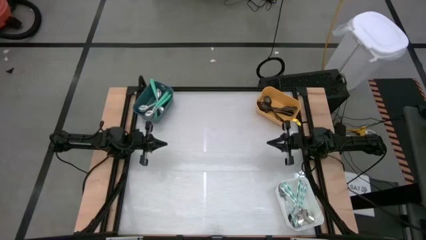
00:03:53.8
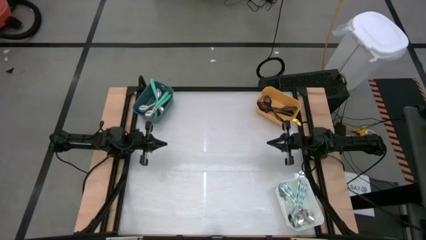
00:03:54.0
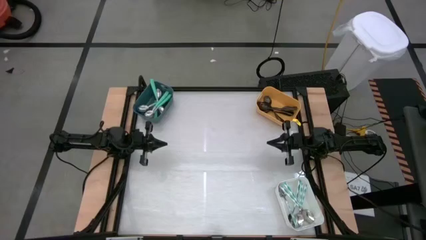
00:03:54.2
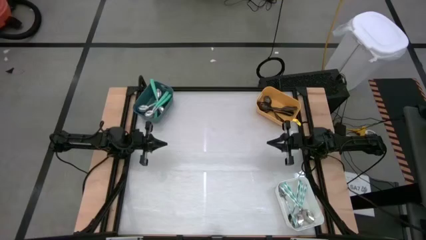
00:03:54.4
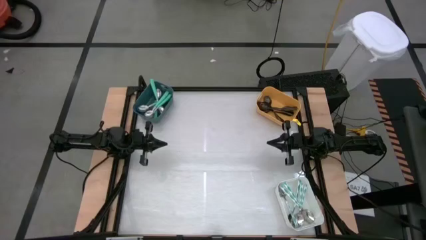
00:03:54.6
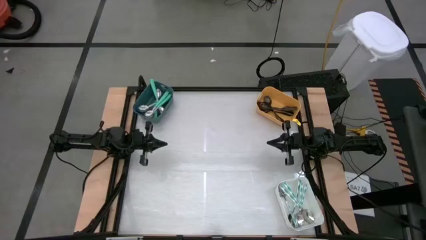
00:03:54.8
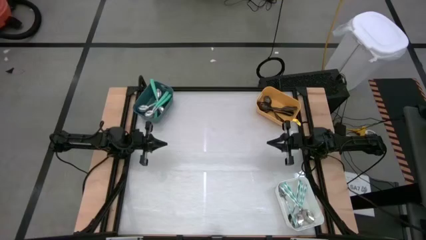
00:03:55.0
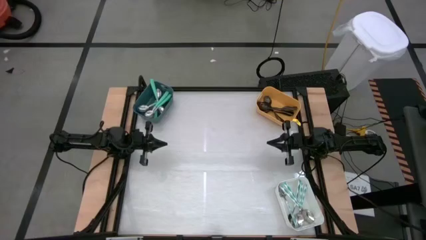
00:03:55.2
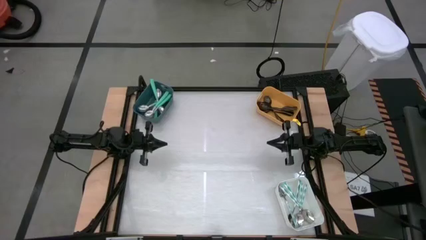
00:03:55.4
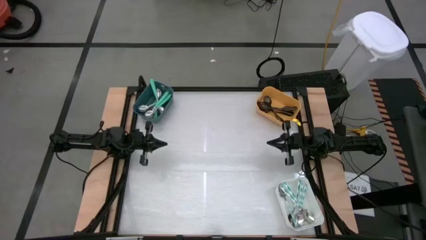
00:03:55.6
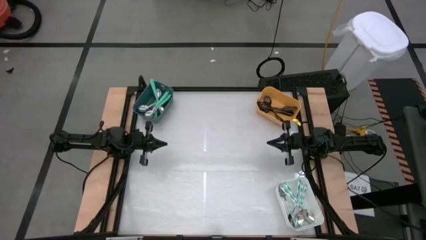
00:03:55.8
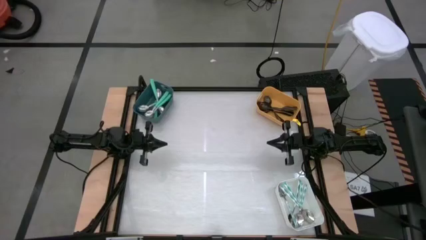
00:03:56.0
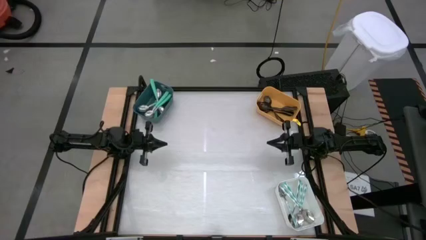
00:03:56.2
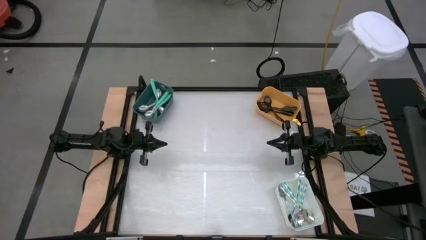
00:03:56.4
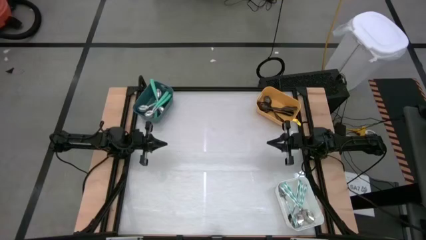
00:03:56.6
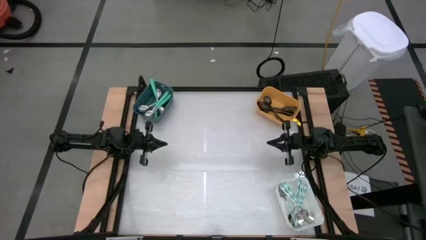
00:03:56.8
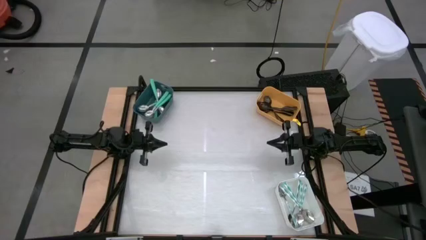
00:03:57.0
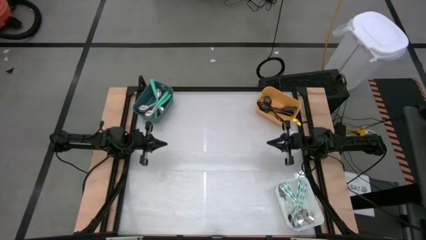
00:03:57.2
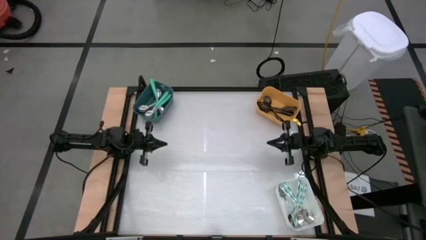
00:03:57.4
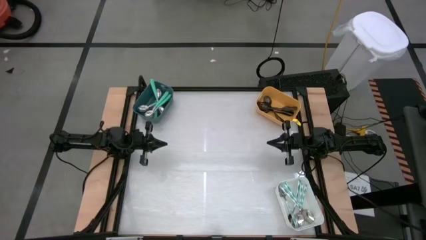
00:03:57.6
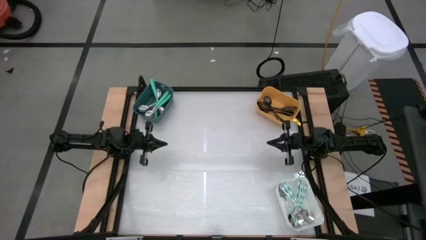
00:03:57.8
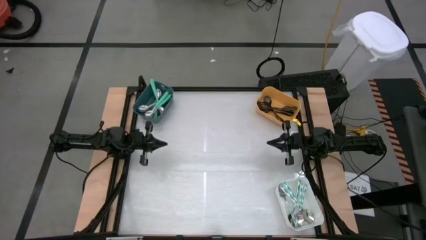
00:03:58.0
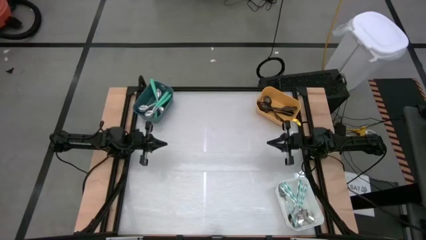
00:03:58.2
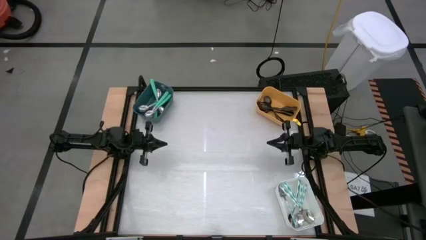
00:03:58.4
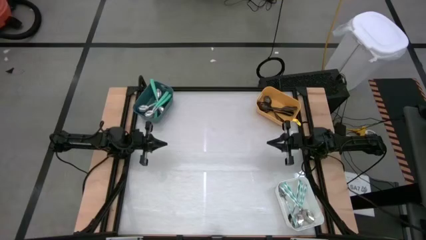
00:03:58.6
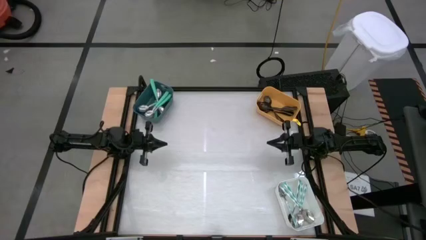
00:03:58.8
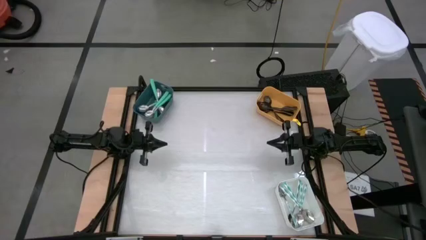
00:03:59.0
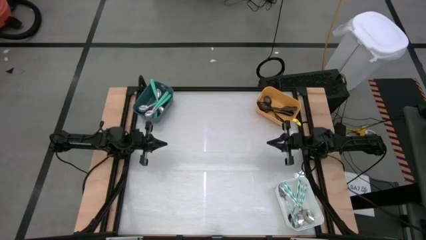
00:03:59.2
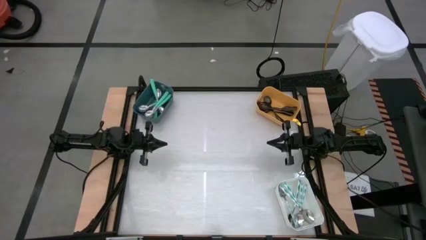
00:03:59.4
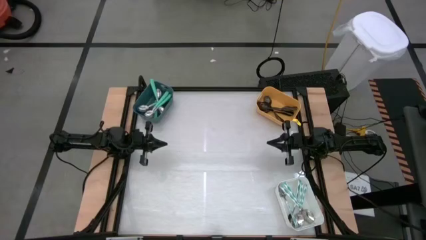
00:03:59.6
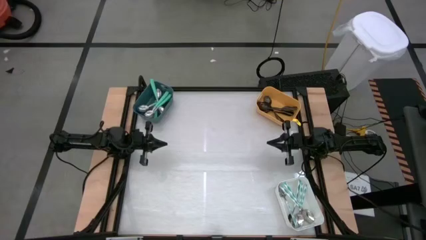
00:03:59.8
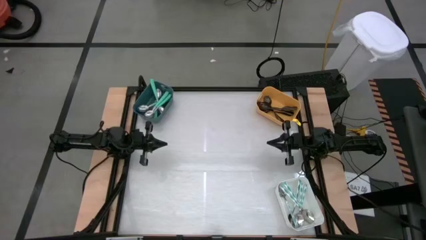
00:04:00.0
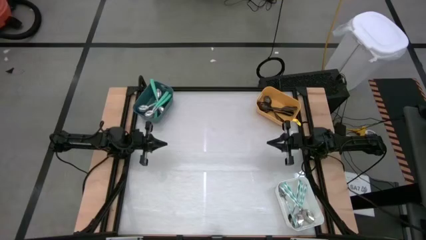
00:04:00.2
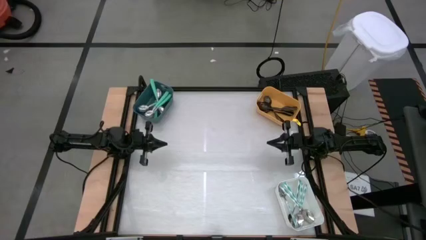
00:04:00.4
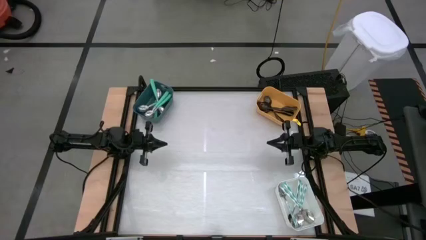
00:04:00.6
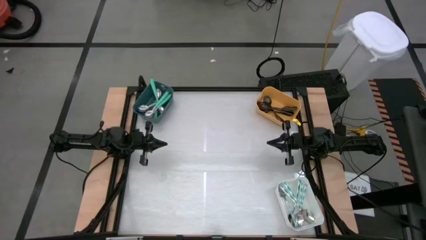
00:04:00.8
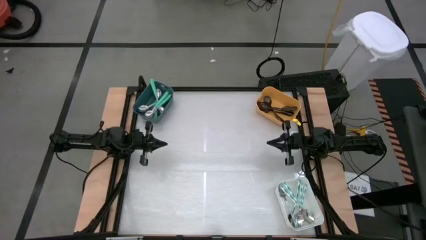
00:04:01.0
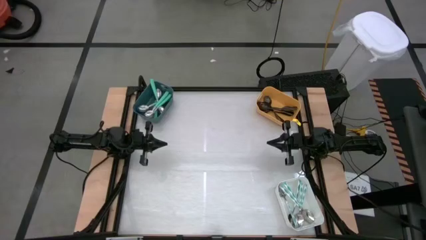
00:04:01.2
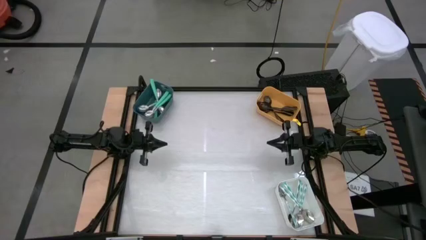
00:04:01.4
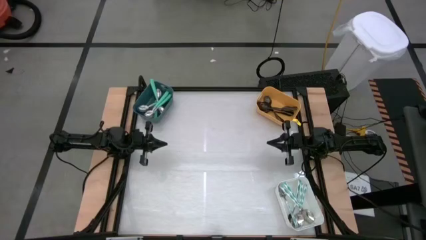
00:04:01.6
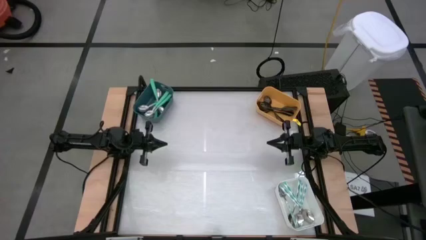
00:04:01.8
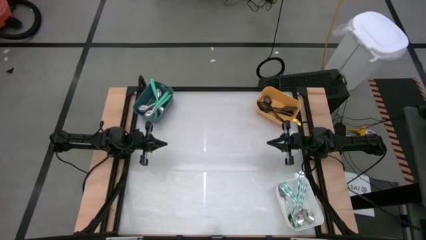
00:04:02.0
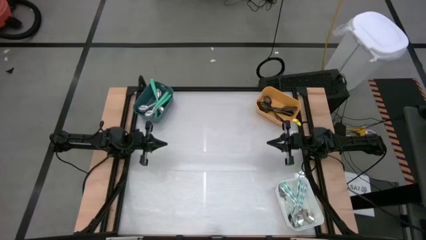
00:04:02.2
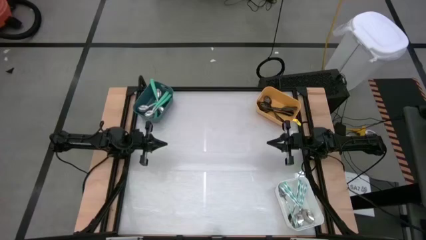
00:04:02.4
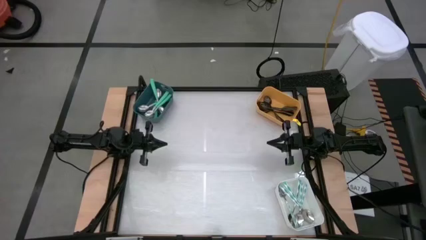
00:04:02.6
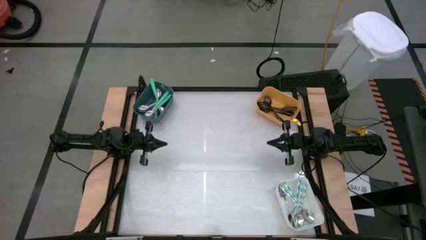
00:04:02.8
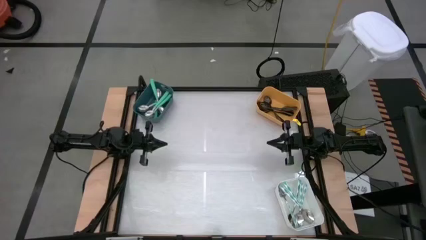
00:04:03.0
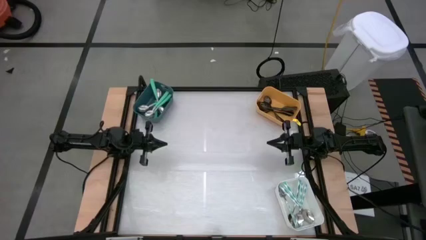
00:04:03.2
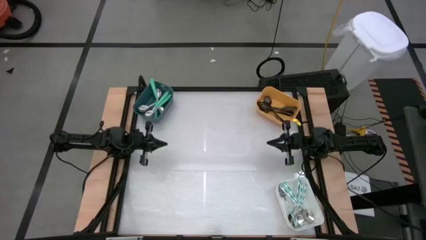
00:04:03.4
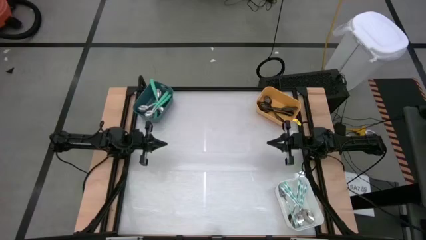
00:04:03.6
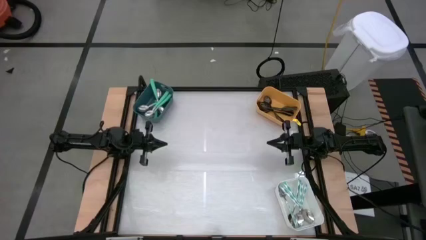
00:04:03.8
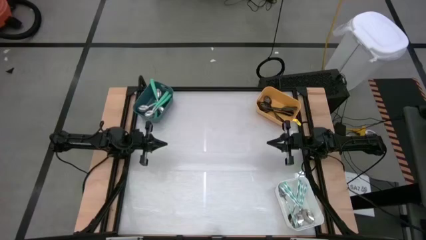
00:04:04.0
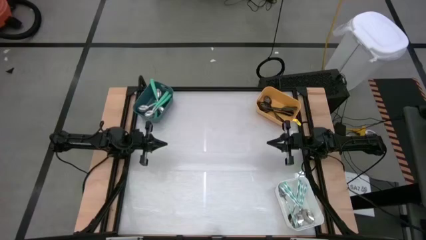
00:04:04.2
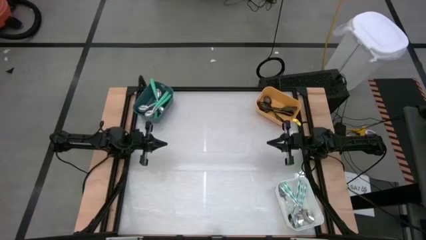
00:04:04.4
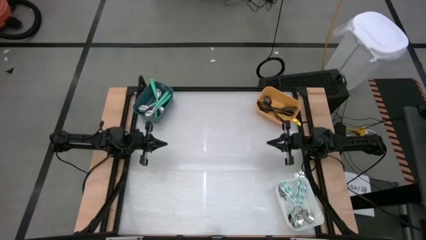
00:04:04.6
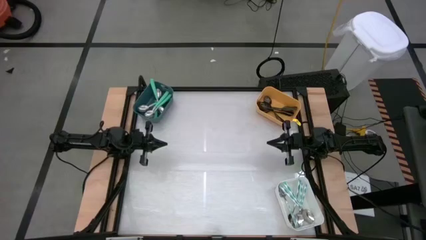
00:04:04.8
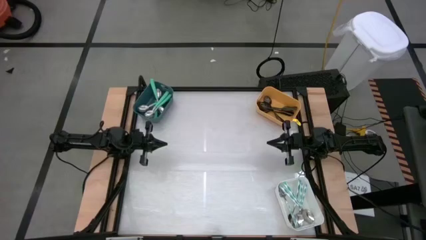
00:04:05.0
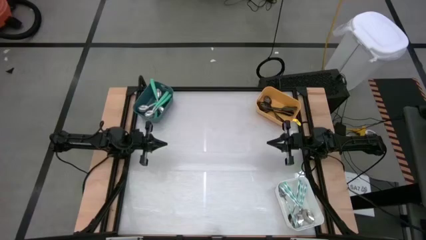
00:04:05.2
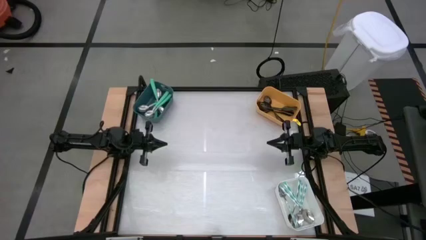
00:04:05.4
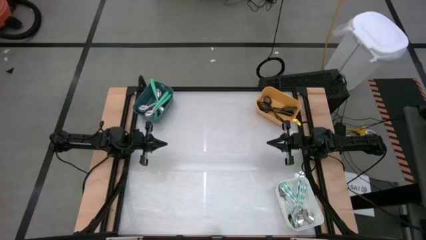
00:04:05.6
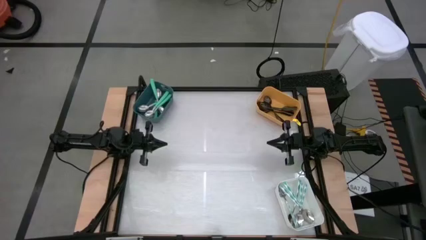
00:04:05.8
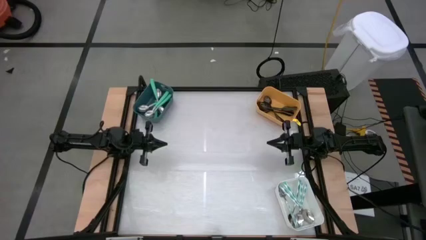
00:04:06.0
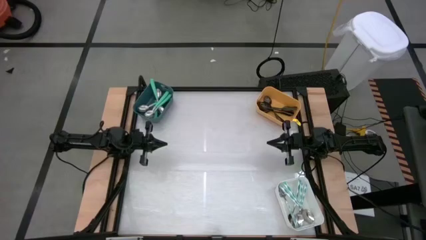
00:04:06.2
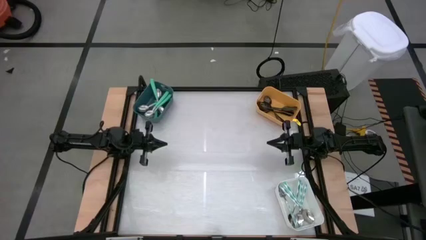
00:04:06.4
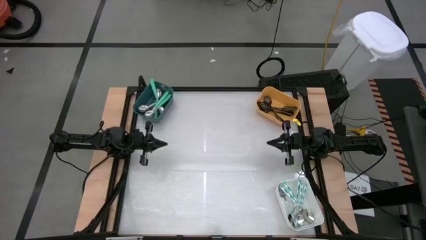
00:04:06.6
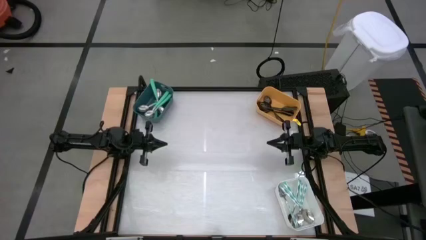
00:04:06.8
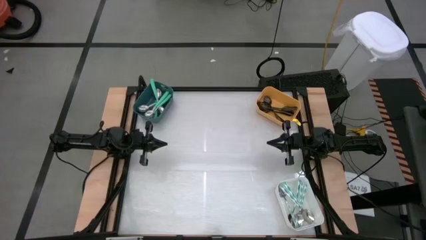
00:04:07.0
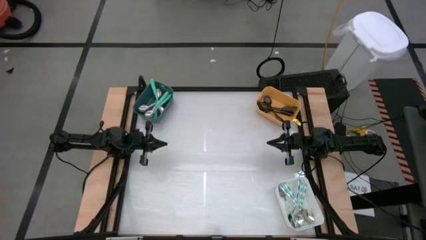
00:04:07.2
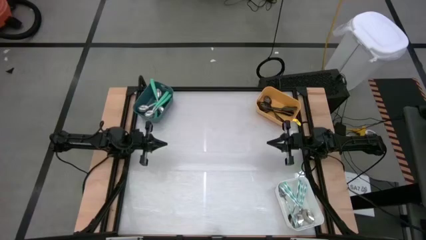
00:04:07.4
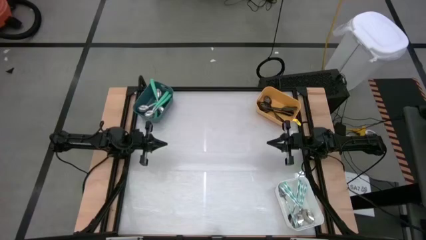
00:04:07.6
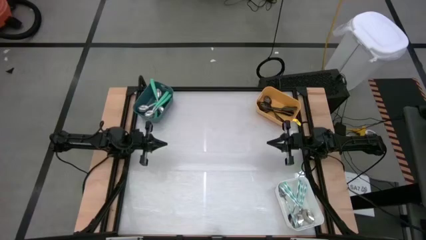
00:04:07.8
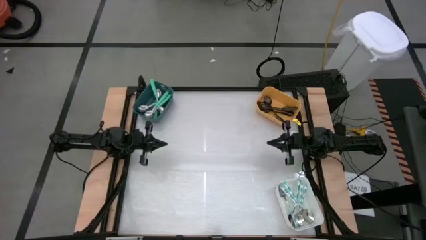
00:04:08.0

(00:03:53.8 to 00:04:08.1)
Task: Sort silverware by color (type)
Return to Home Position

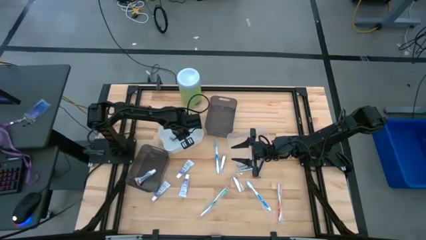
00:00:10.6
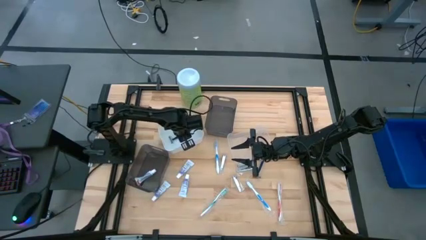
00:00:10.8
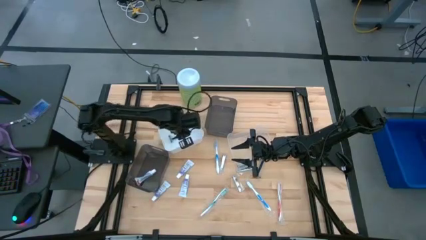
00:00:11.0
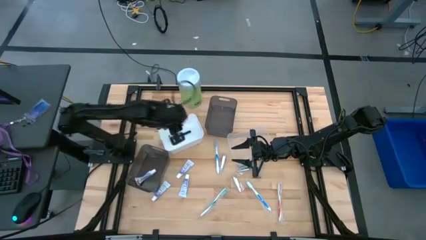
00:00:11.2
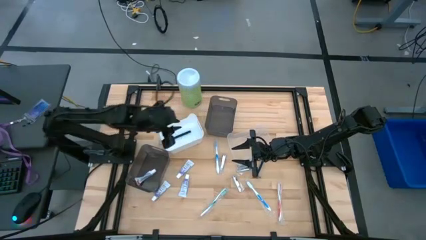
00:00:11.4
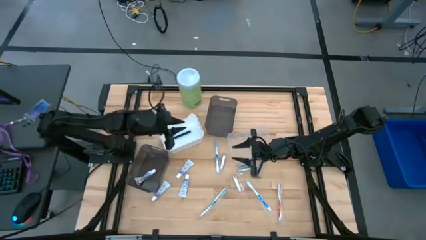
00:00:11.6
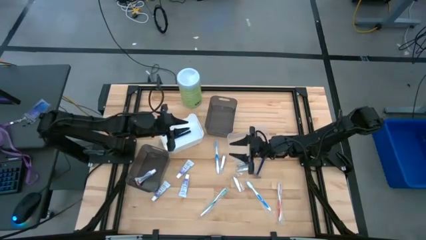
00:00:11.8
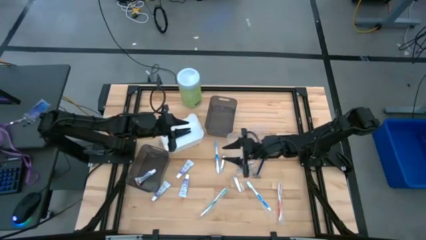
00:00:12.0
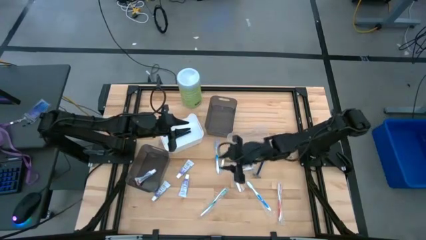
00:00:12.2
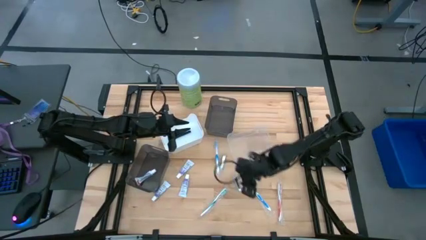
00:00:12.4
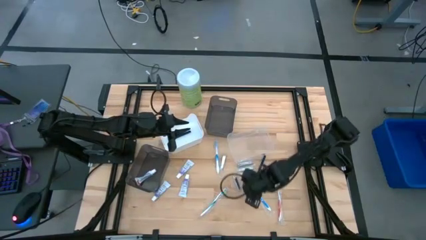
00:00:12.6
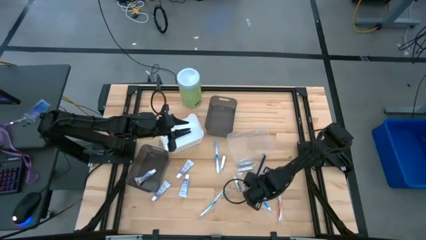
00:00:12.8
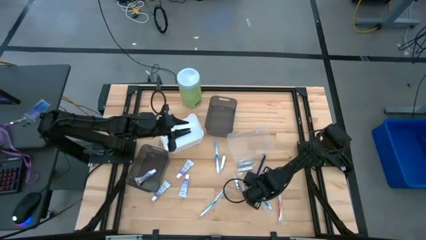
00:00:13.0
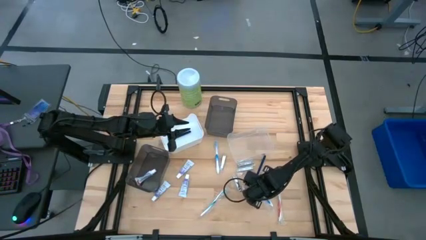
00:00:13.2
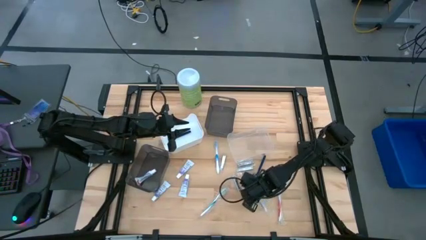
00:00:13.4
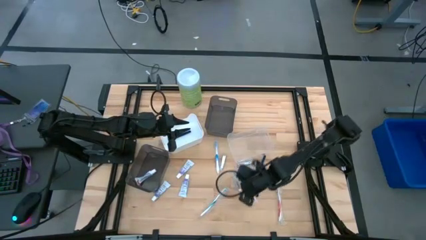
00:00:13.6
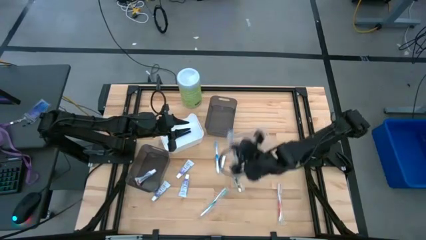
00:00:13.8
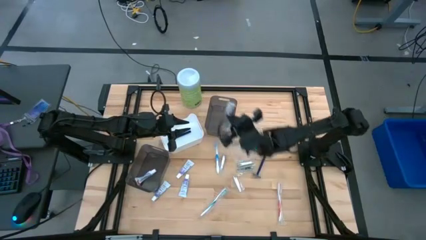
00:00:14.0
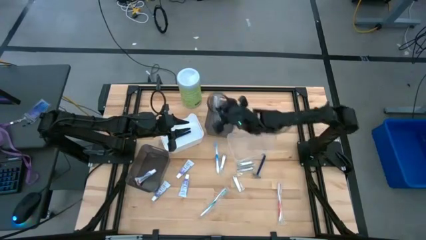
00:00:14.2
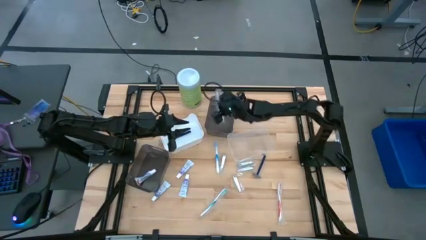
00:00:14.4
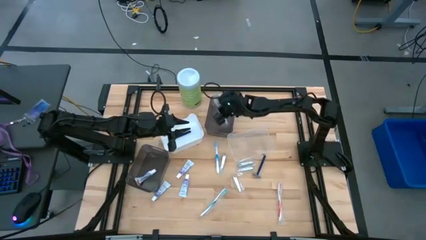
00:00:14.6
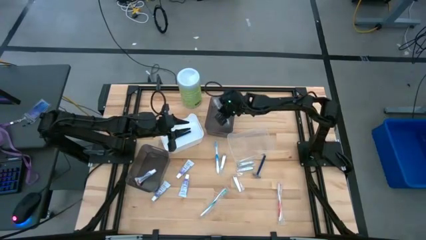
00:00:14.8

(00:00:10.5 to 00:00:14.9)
Task: Pick & Place Travel size toiletries
Put the blue toothbrush into the top black bin
